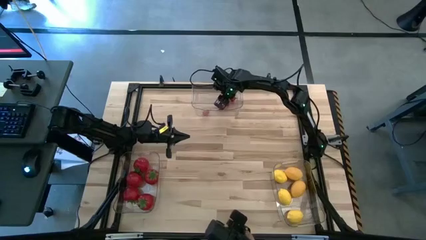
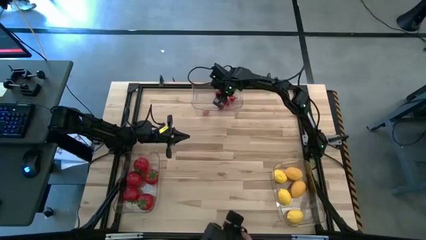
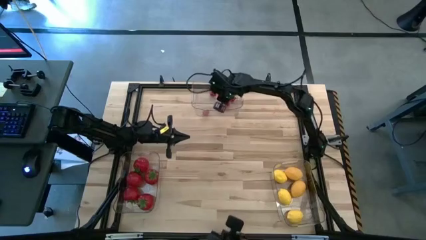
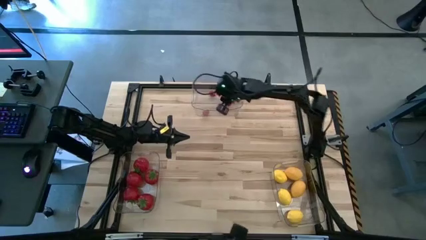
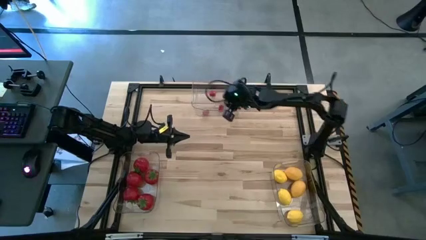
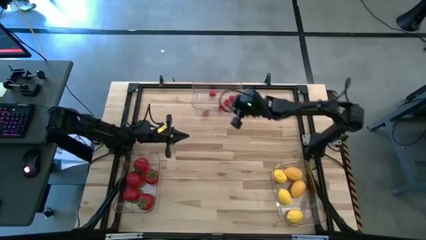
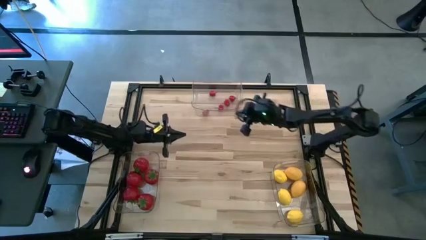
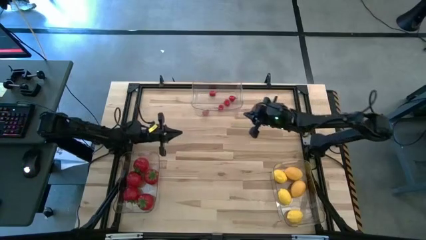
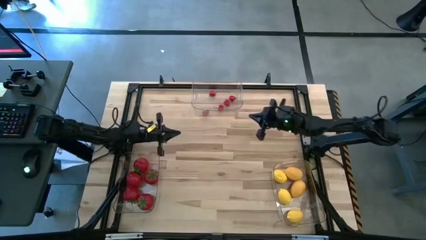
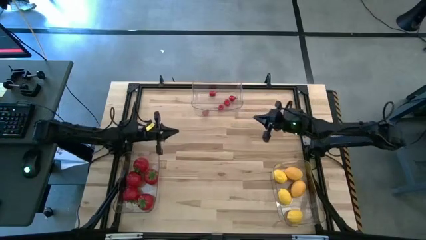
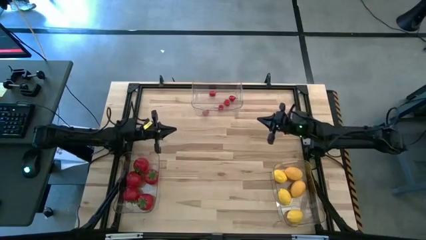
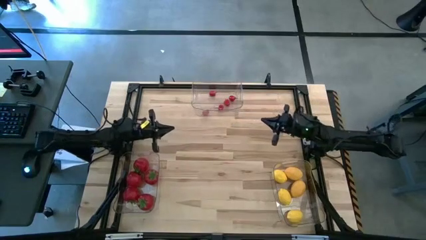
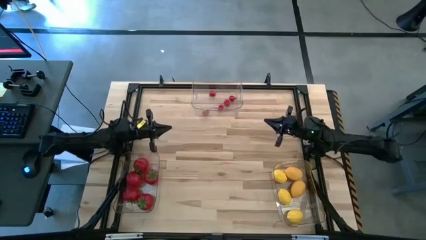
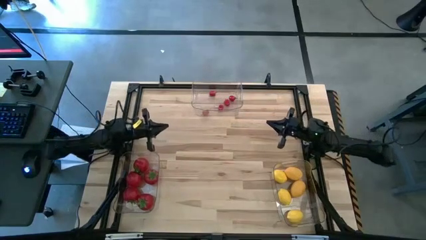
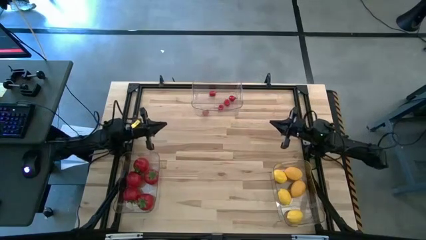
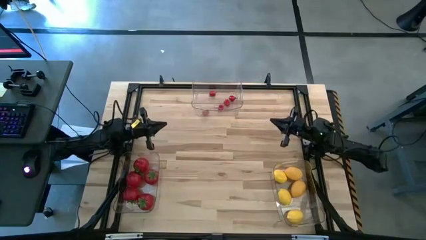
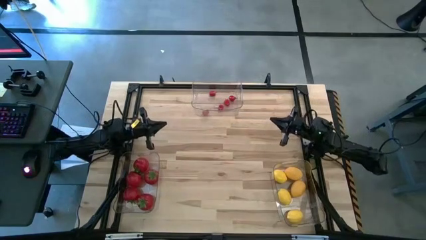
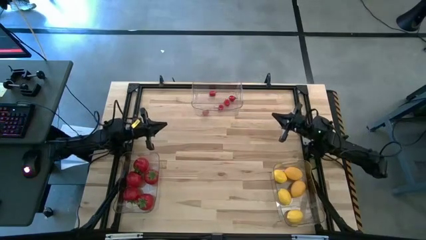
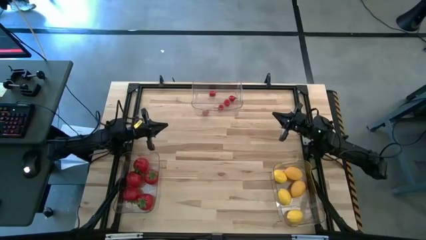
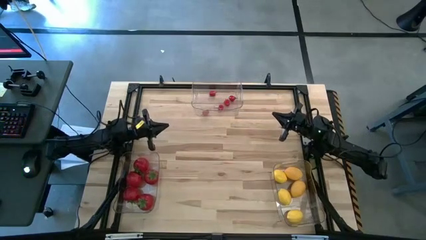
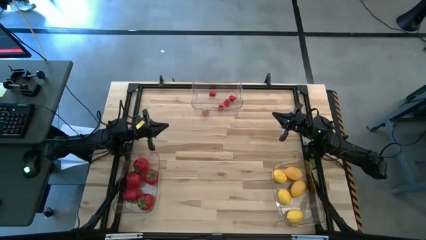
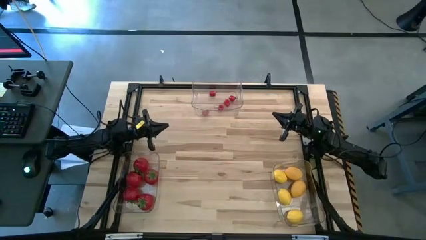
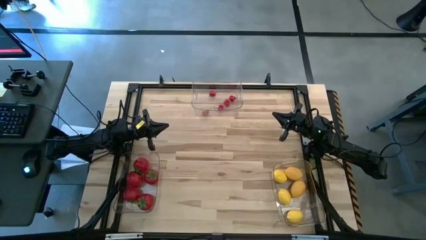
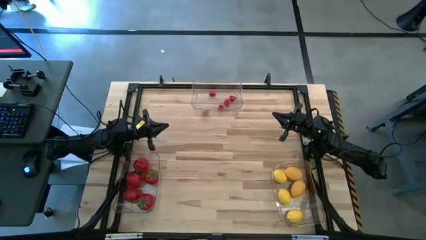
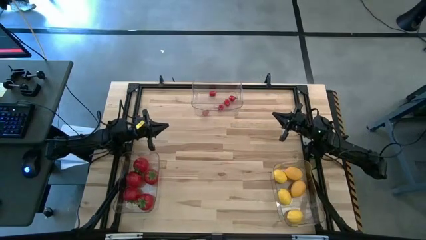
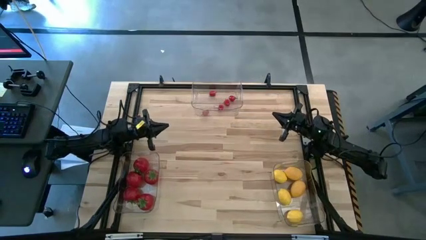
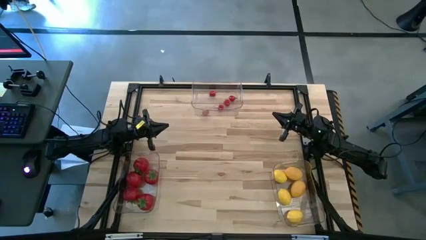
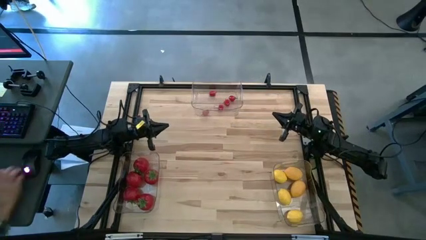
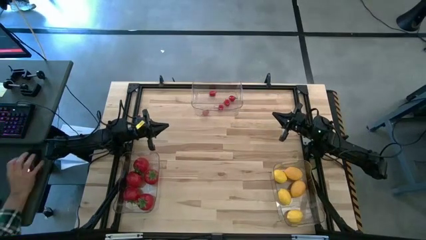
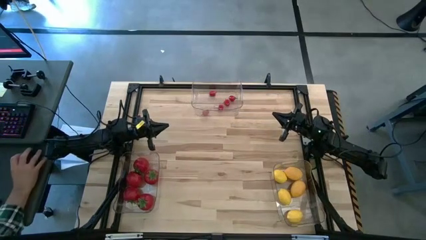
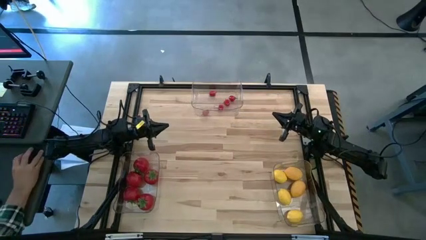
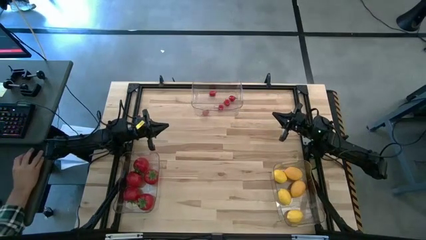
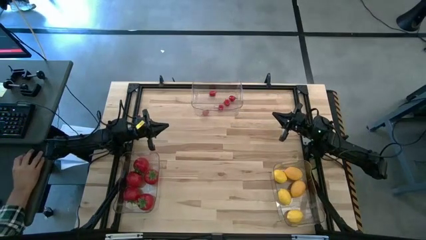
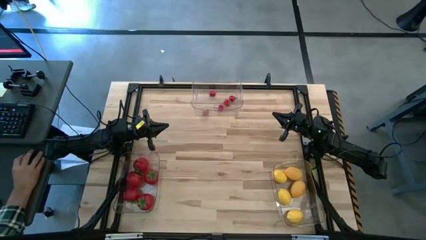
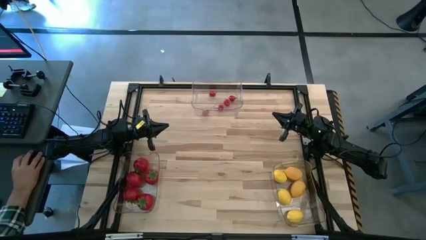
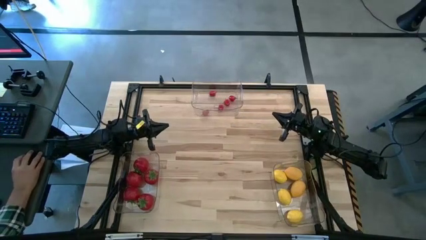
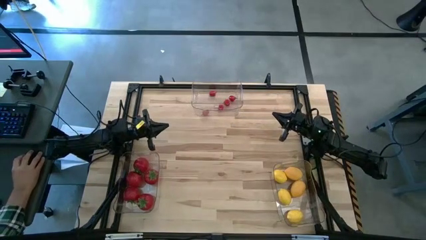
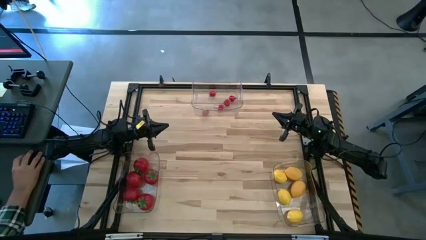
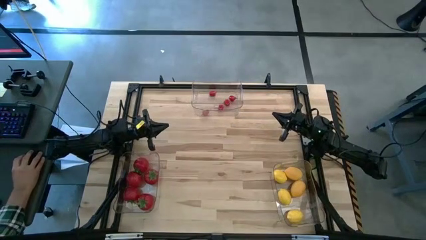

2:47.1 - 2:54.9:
Task: Sort produce into baskets
Return to Home Position

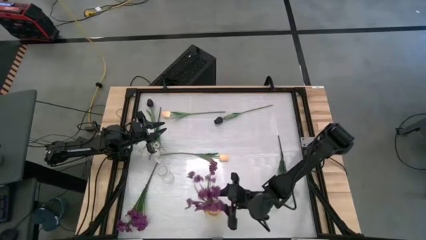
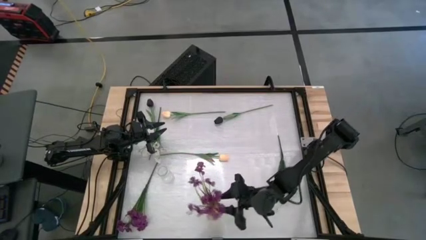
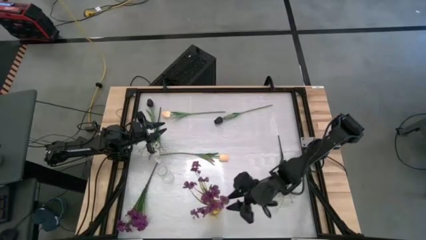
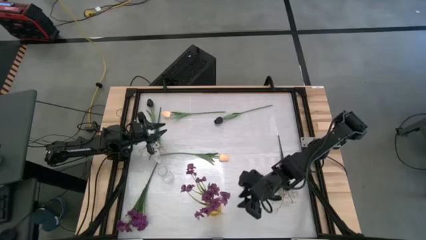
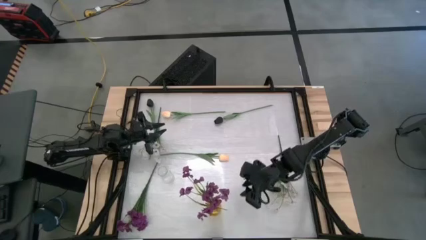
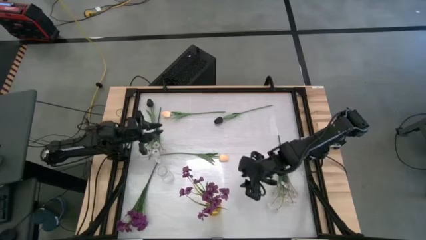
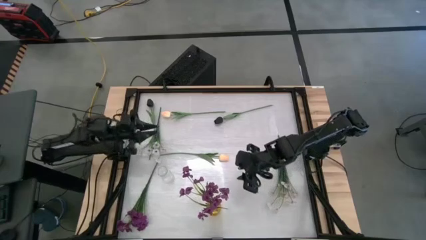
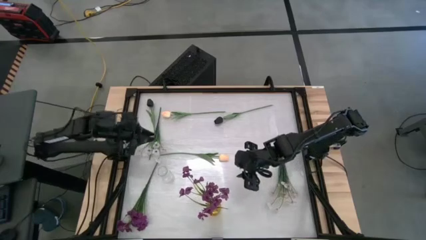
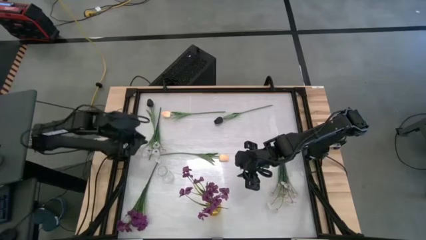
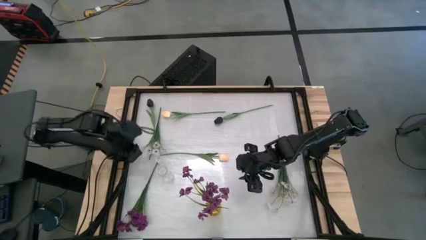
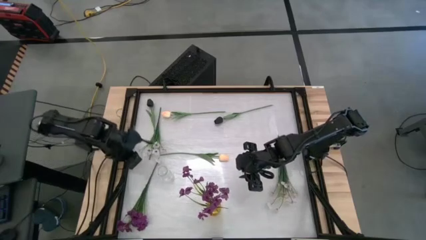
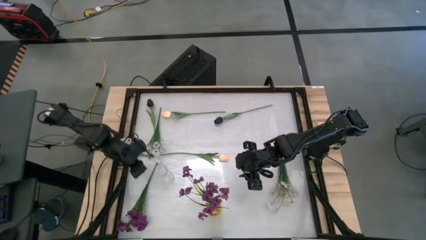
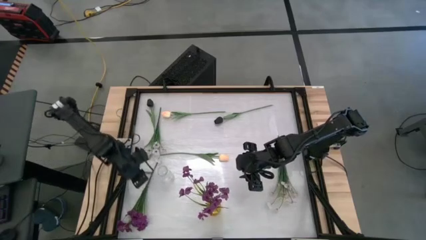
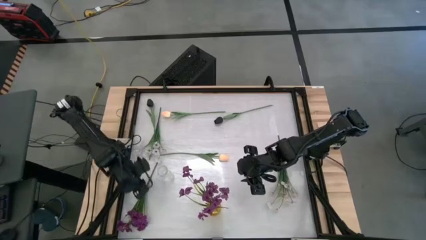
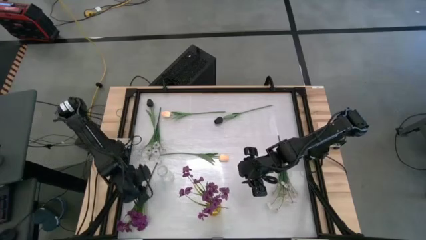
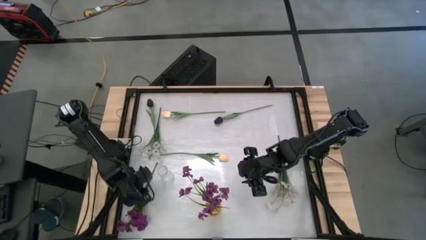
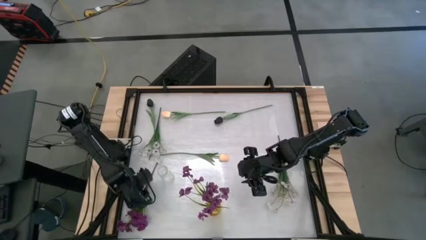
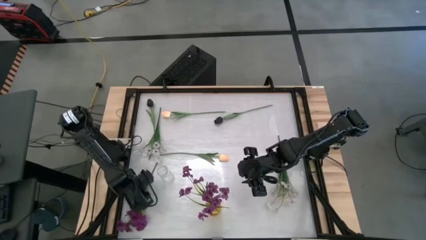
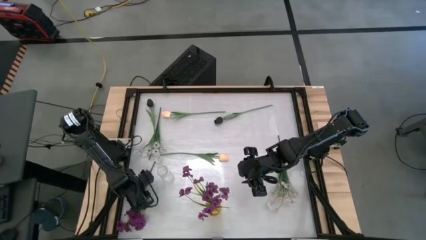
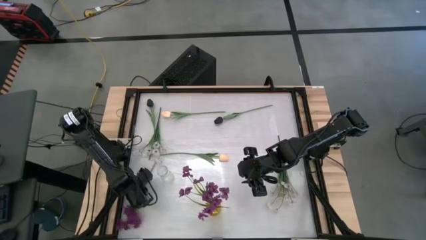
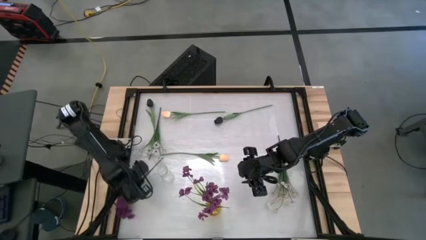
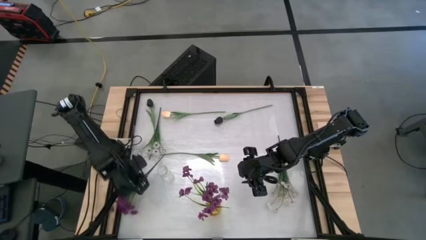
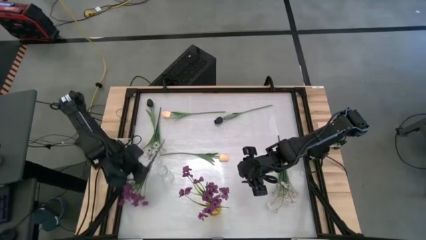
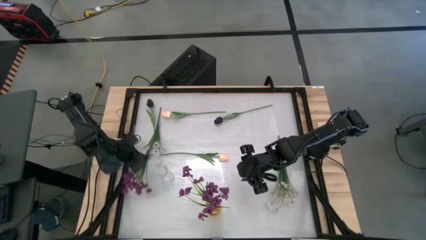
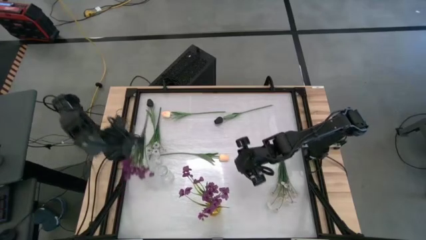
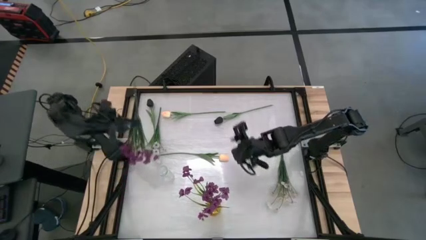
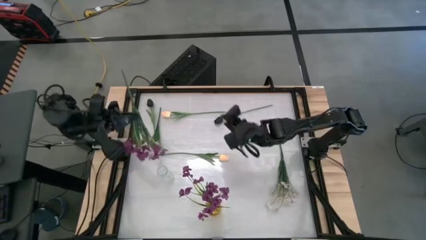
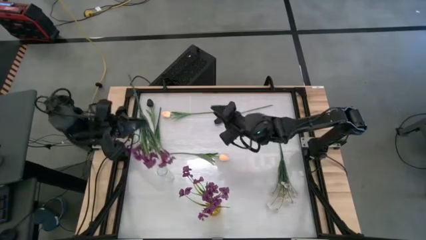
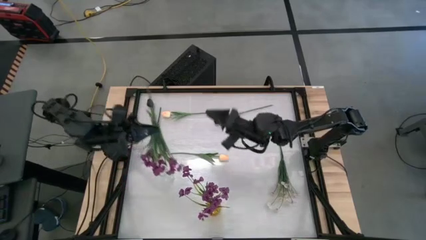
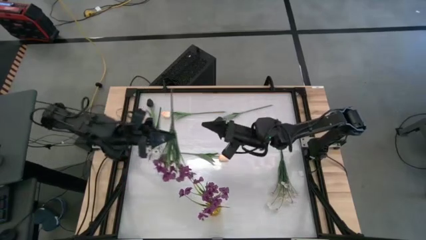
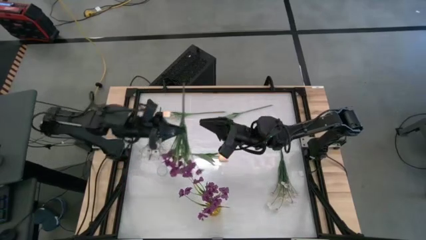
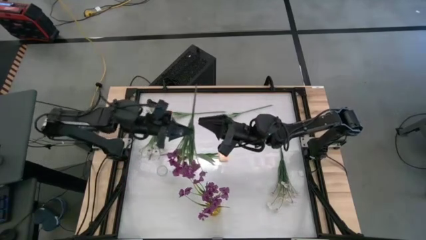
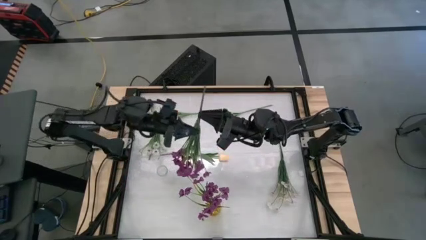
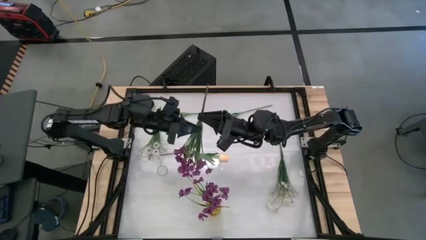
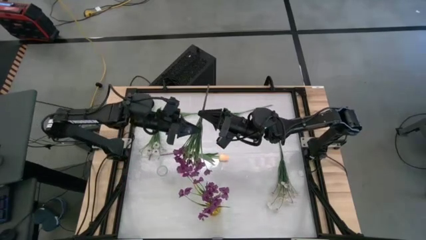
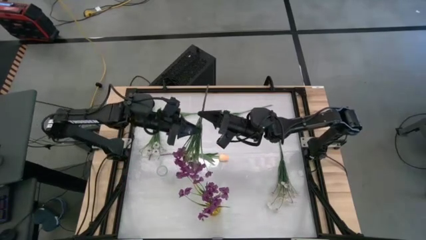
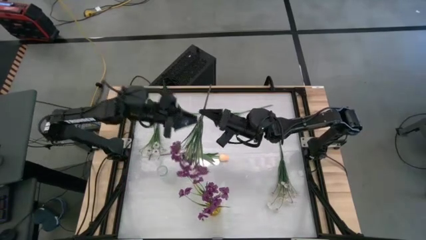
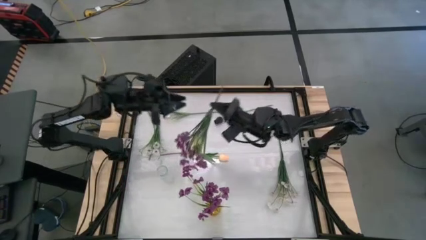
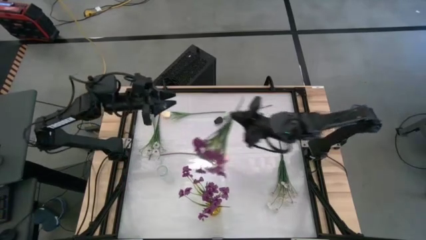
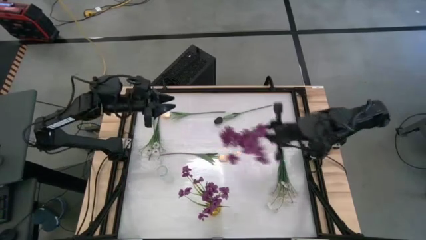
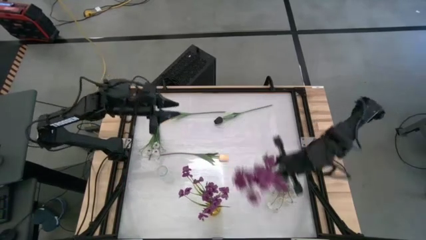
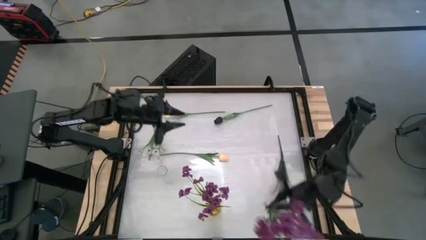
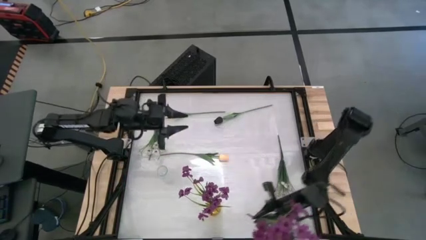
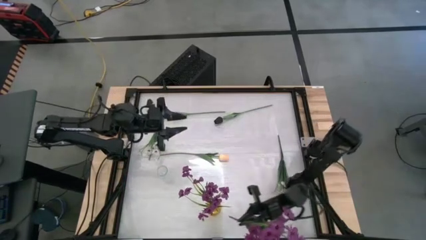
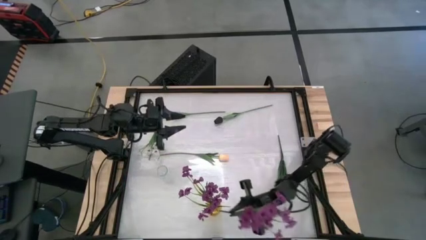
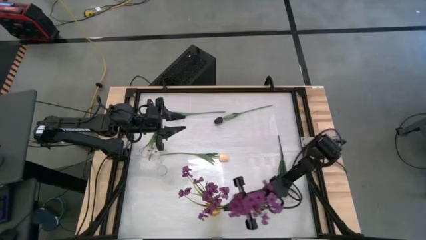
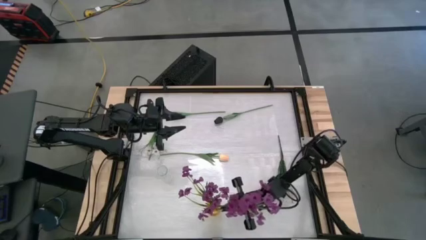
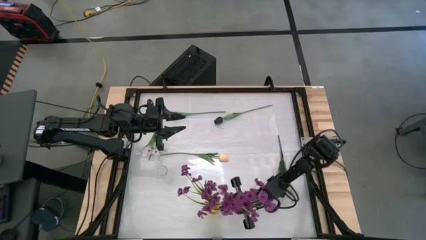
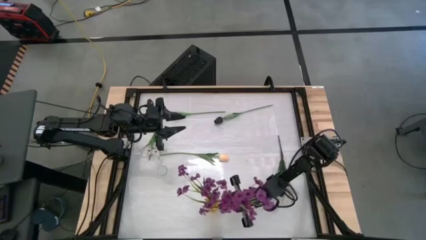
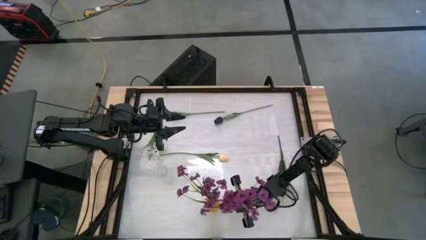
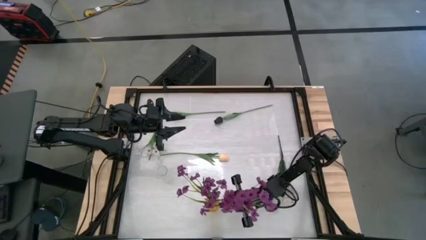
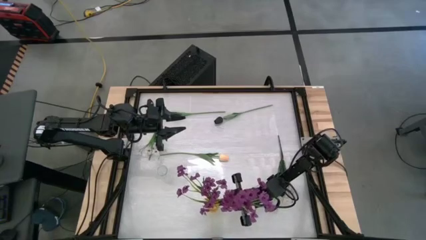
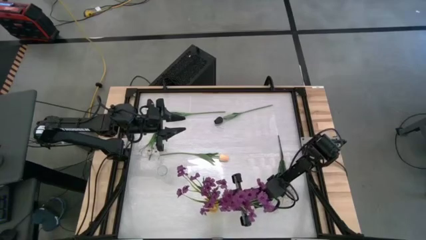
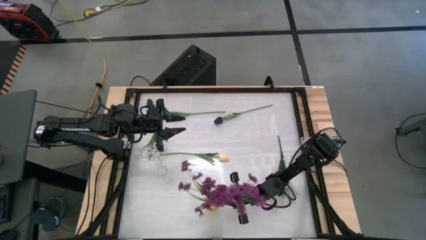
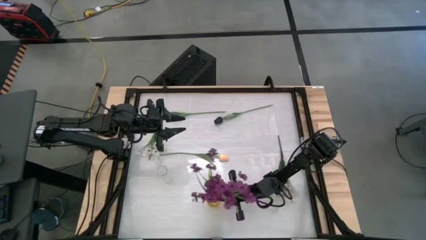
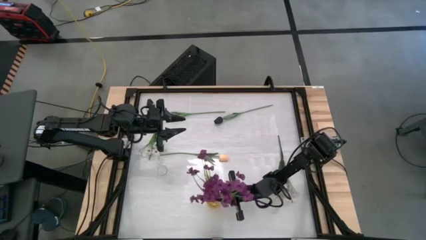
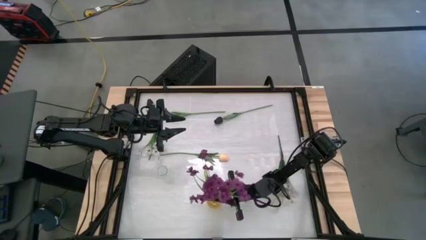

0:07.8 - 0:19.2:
Task: Sort flowers into vase by color
Put the purple flowers into the yellow vase
